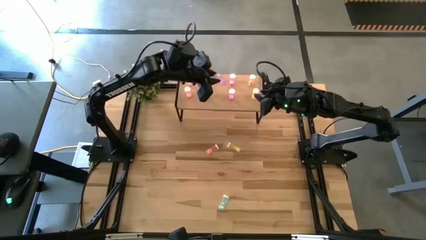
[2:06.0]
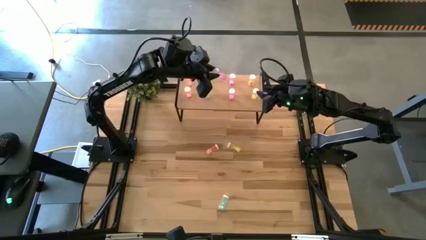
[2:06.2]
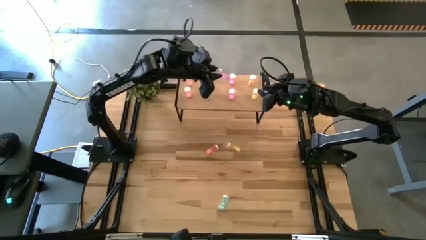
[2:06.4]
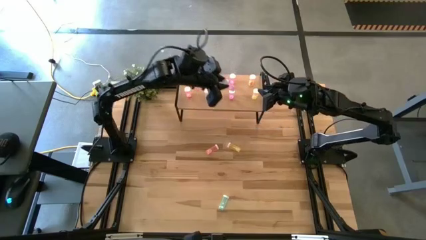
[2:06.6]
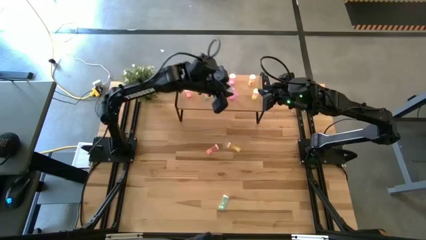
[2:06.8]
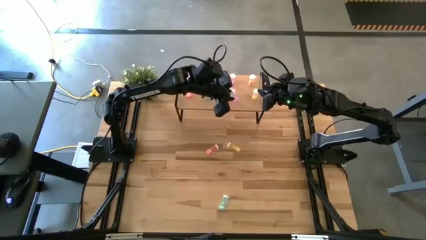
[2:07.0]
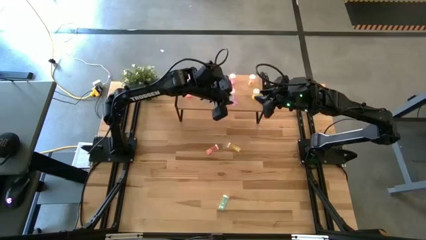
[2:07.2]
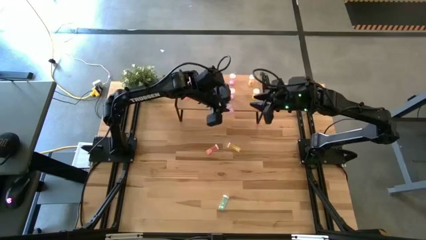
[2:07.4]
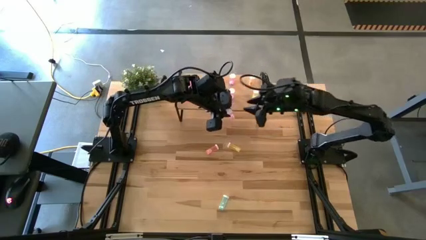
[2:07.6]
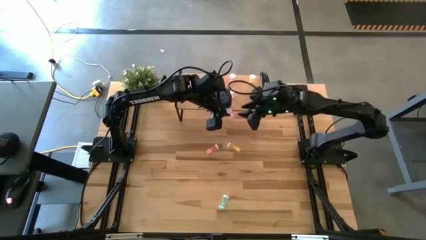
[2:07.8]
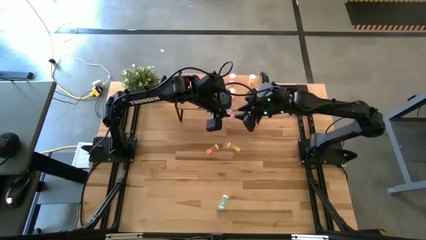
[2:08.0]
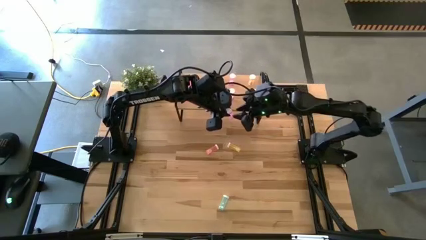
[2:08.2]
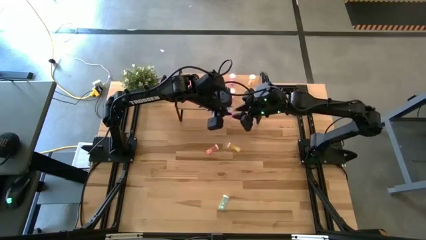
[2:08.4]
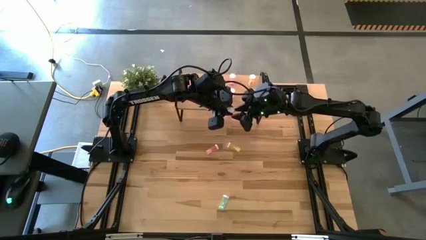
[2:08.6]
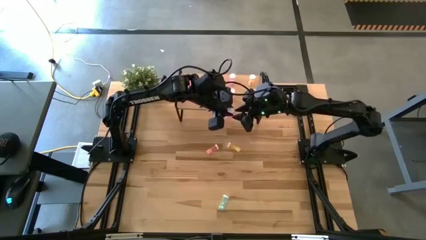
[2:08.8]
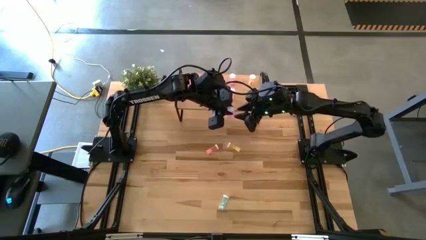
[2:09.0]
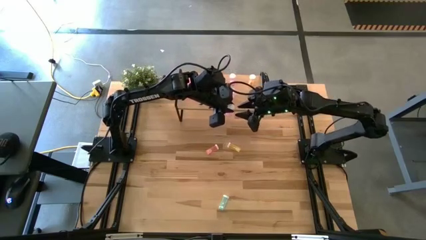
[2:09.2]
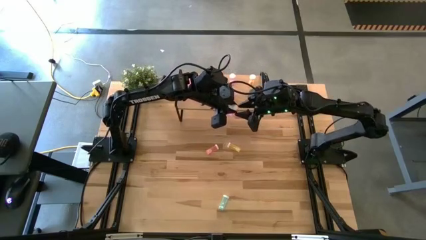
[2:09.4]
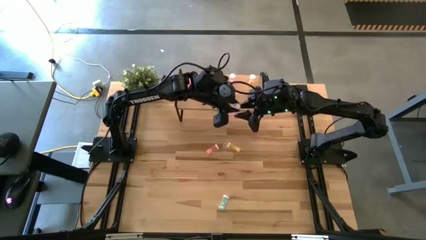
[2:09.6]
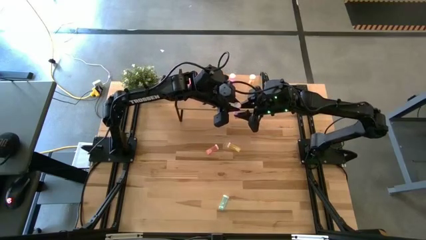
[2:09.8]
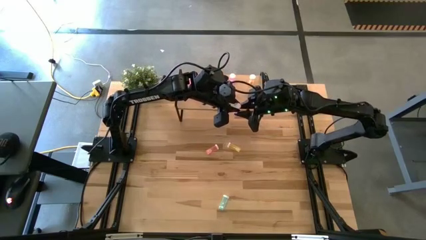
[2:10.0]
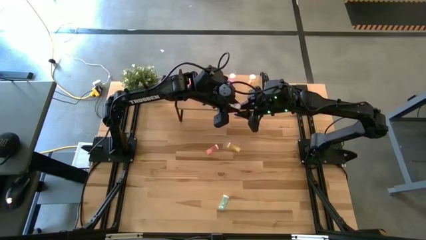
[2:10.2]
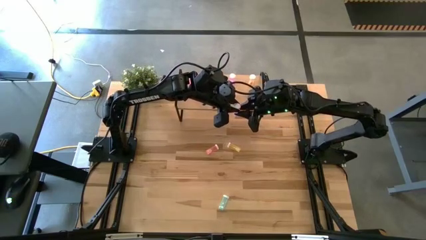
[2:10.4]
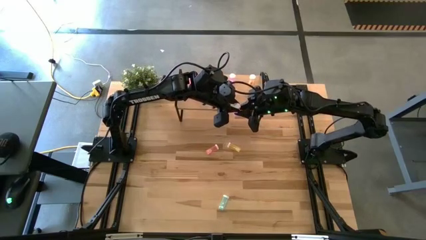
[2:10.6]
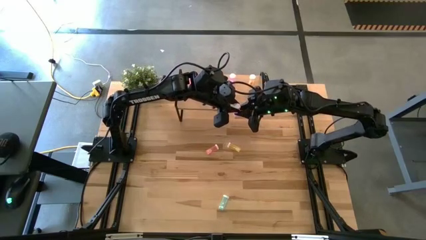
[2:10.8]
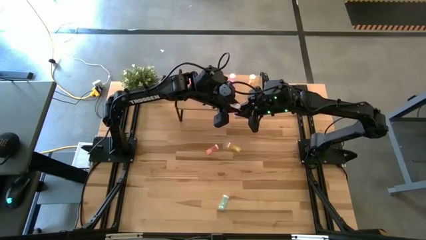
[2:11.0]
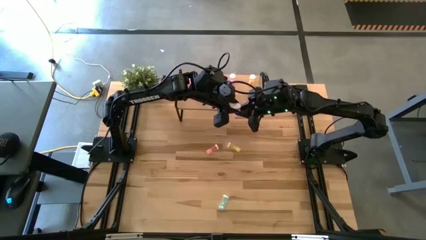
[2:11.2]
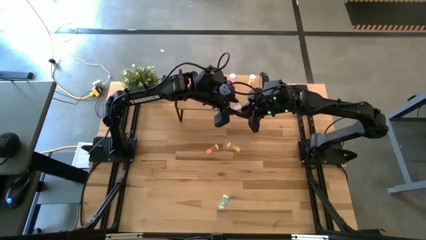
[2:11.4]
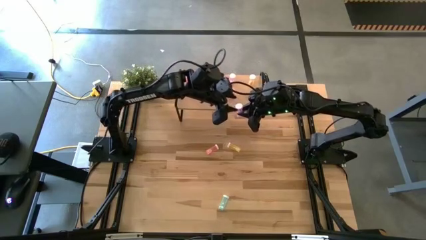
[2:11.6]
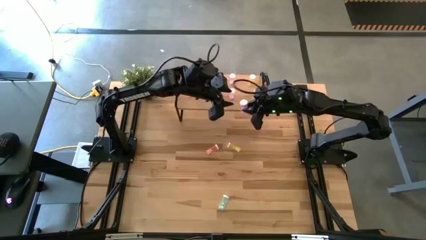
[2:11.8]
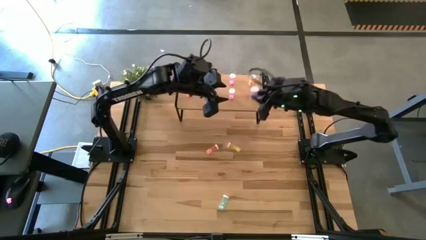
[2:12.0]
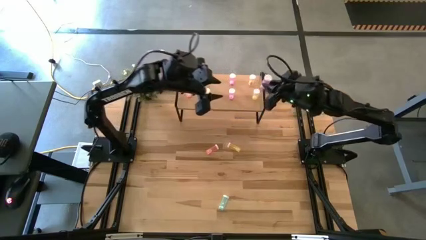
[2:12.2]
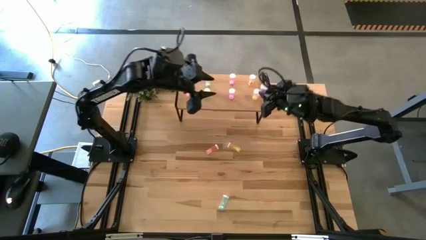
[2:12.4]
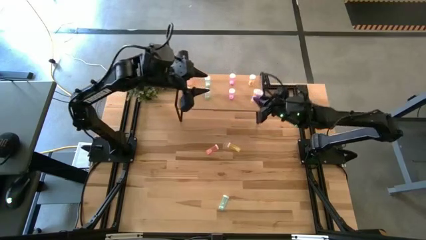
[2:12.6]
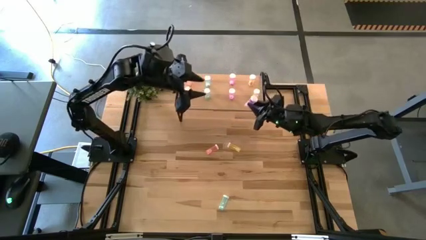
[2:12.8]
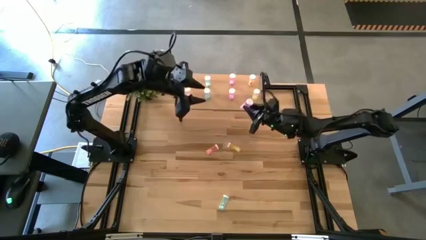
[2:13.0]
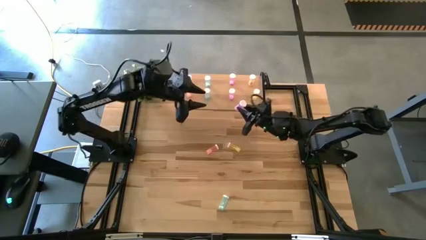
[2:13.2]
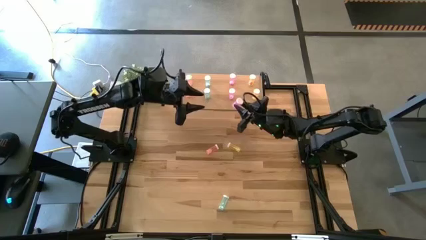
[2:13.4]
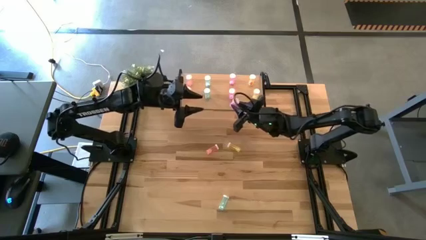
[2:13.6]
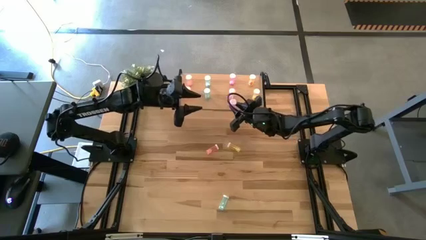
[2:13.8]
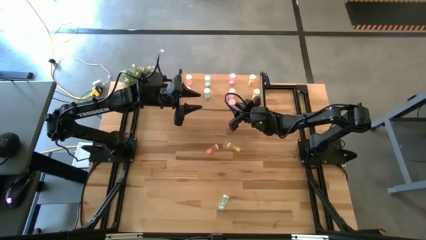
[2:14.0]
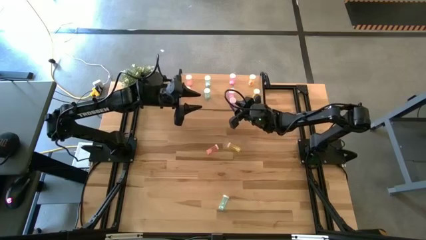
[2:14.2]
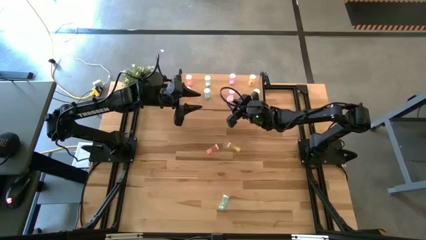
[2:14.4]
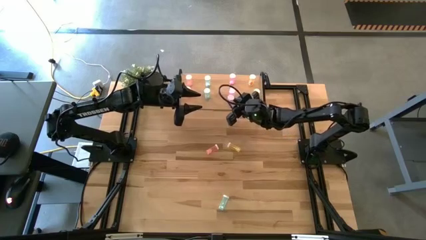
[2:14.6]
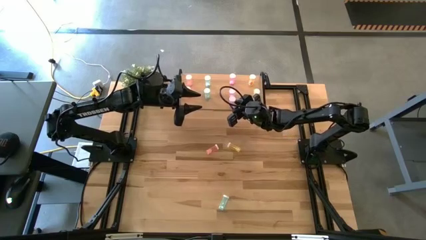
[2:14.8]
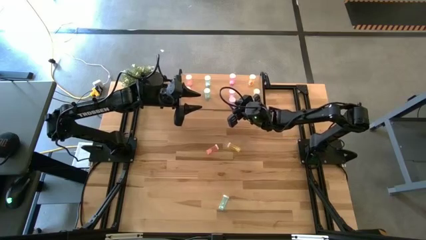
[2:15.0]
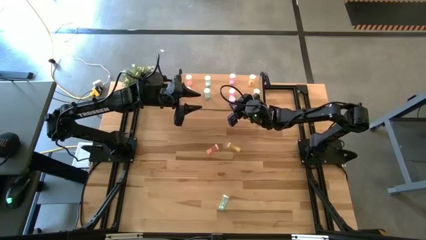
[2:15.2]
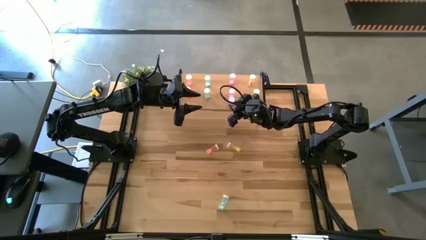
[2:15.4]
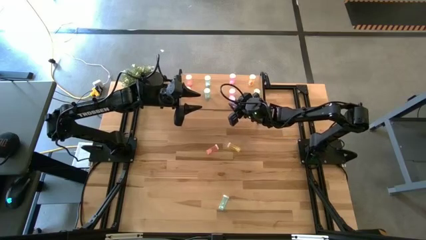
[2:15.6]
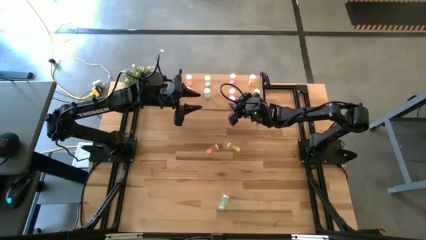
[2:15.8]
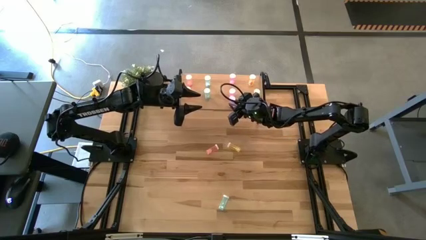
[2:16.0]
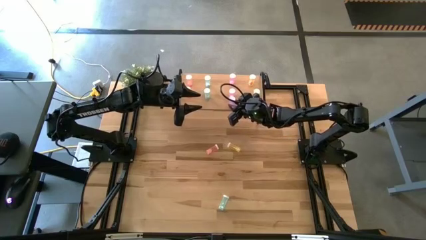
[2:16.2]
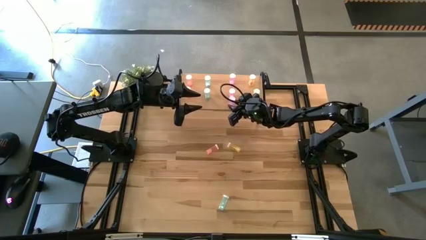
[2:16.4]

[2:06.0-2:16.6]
Task: Pick and place medicine bottles onto shelf by color
Put the purple pill bottle on the shelf aligned with the other purple pill bottles

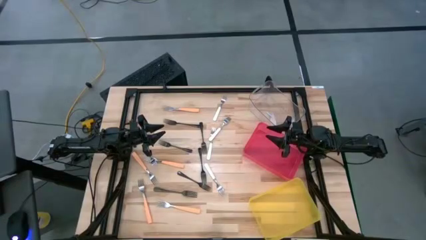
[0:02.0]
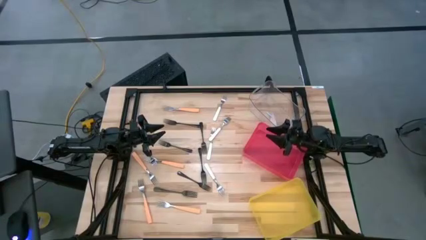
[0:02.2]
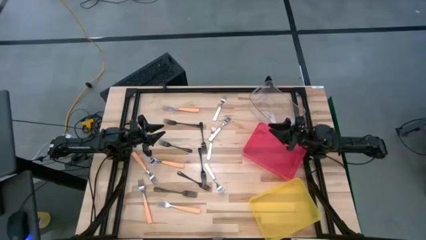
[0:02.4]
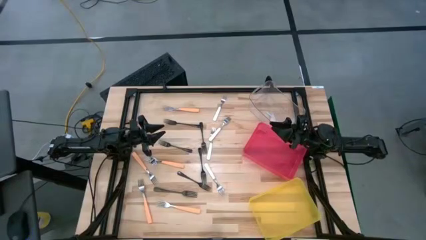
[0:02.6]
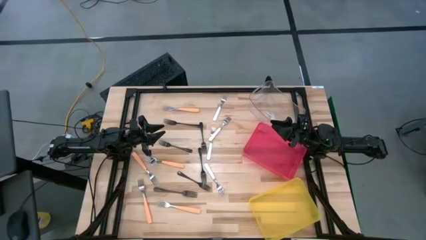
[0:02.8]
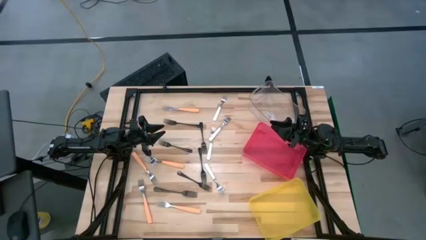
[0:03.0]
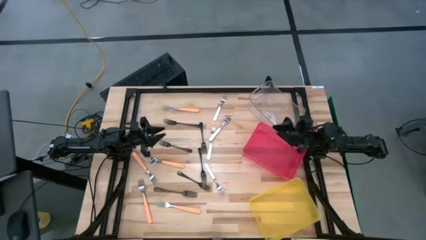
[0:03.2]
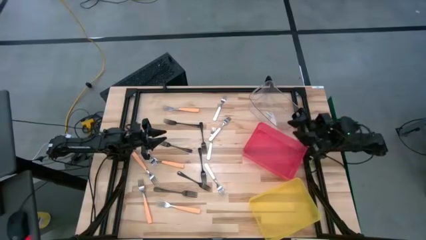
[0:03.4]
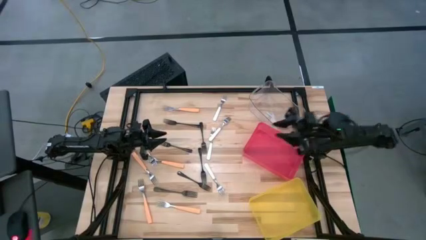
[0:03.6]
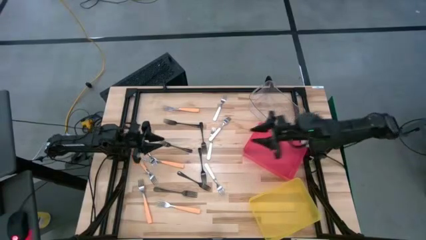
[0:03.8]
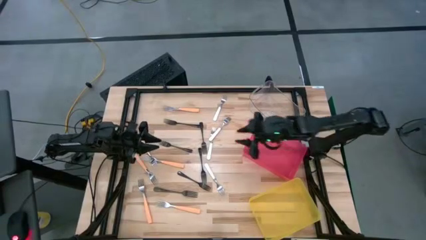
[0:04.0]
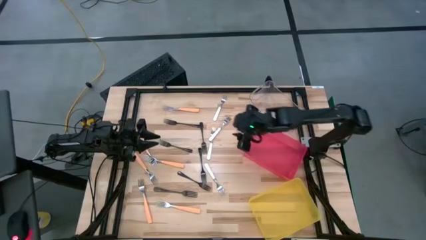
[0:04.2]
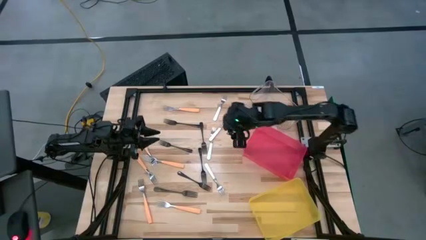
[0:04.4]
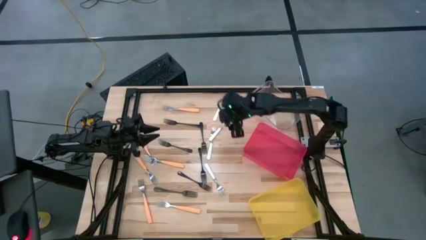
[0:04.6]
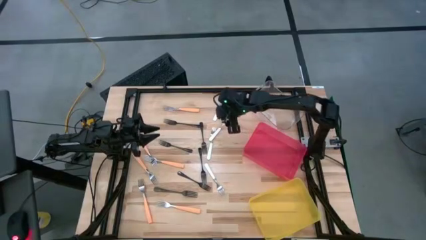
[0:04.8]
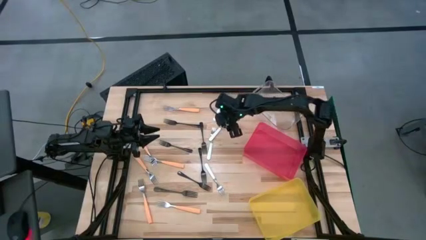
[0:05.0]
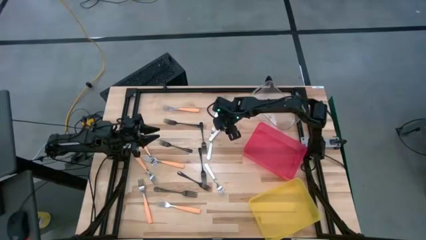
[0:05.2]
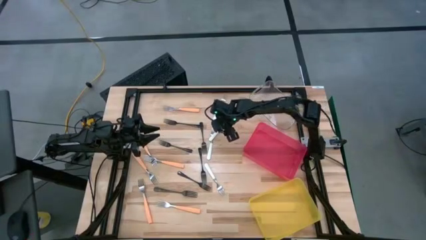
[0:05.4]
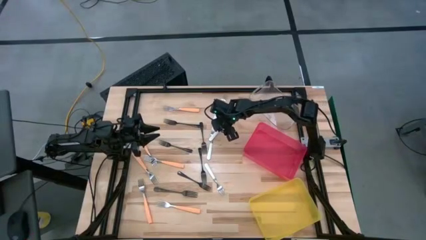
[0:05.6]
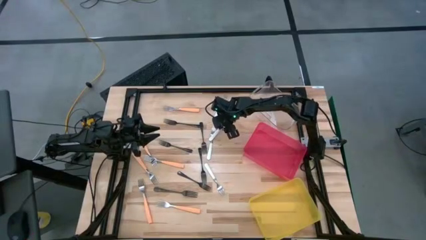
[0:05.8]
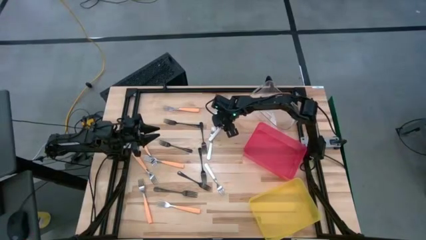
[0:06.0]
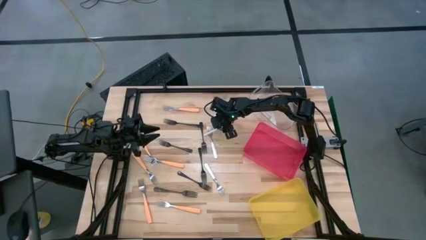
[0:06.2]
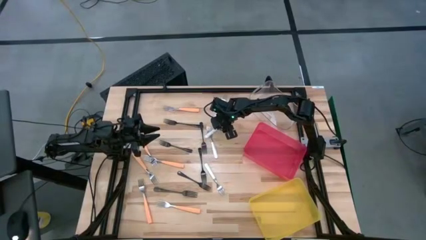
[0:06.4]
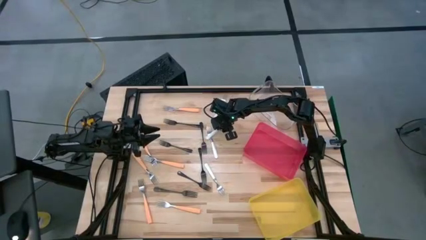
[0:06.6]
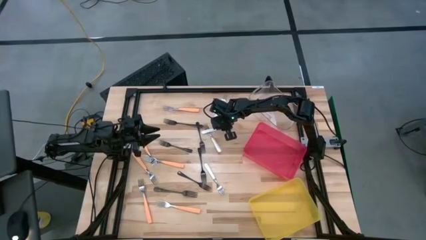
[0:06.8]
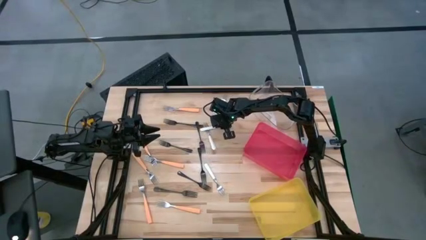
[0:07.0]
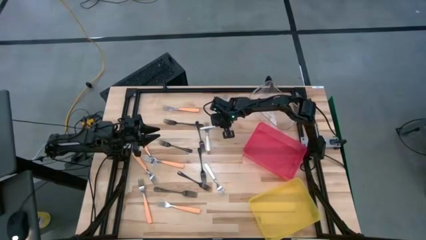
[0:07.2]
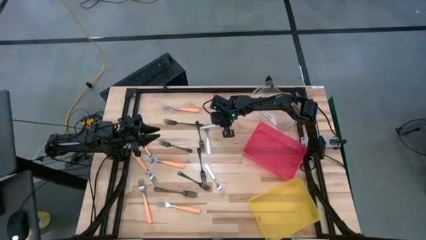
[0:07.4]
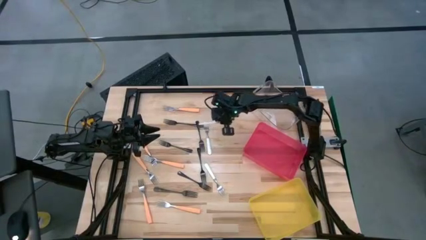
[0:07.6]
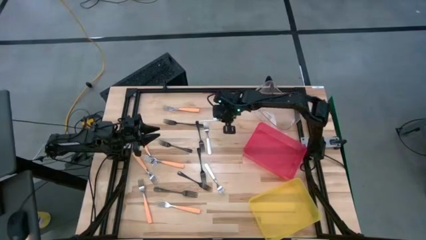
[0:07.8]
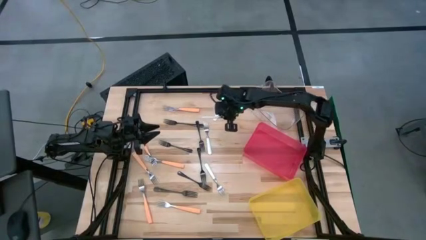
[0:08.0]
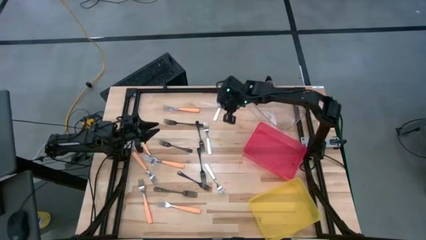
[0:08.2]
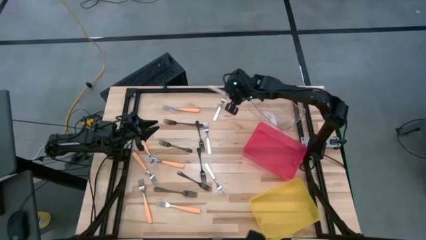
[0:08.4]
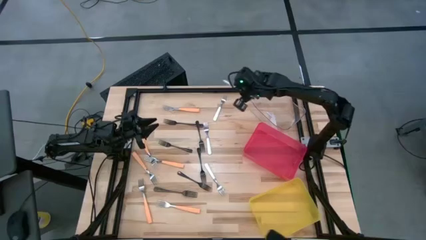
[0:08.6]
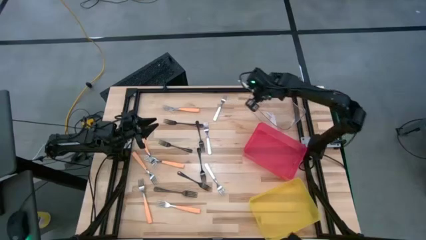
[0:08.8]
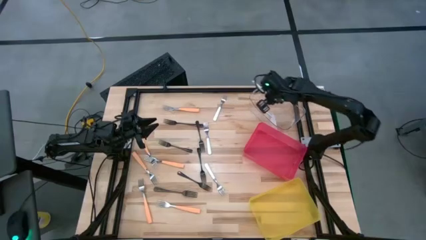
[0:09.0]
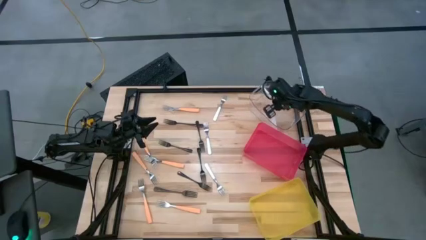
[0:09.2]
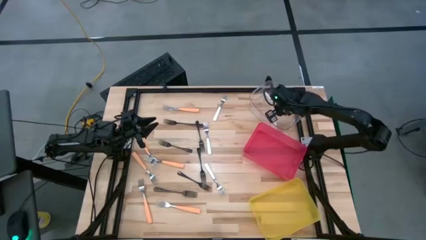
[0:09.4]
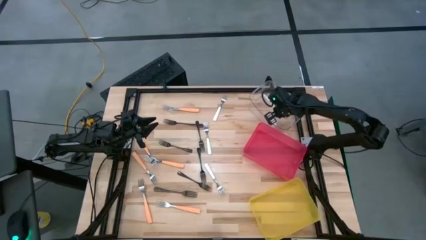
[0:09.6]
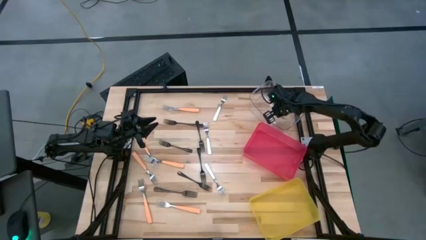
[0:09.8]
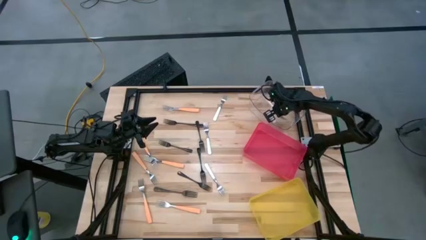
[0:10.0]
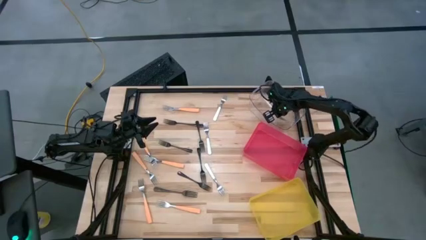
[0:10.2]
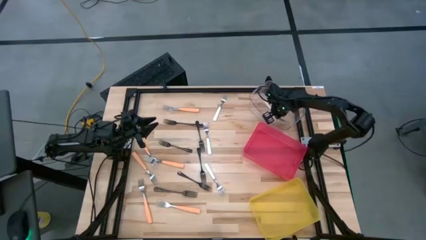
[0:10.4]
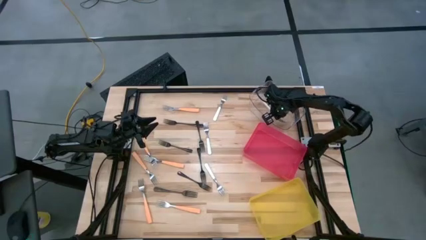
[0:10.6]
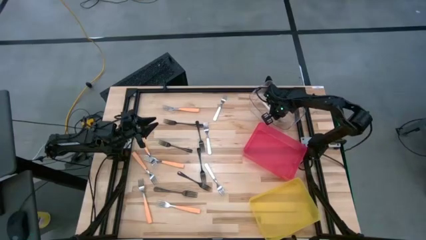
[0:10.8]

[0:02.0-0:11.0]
Task: Sort silverware by color (type)
Put the white fork into the transparent bin
